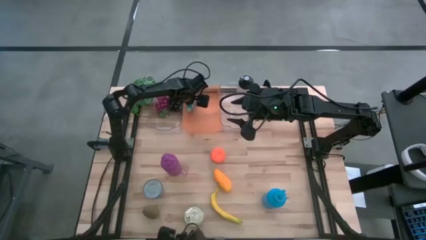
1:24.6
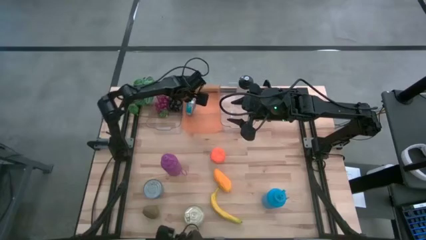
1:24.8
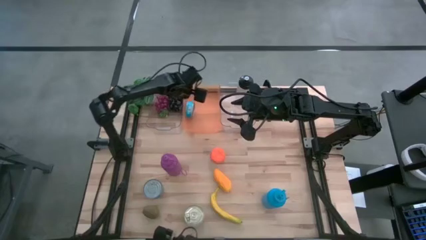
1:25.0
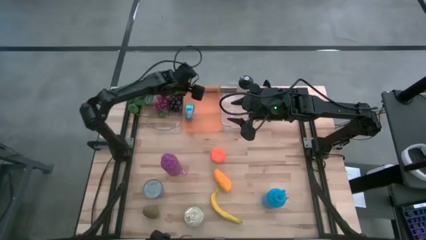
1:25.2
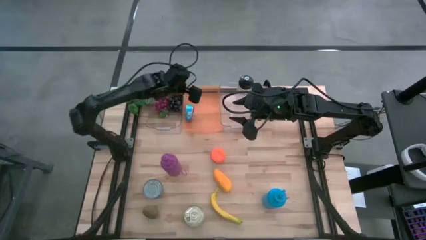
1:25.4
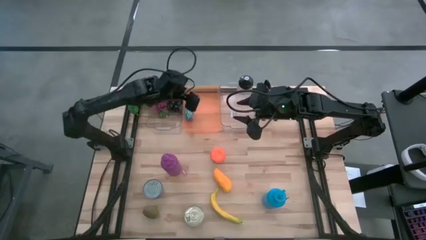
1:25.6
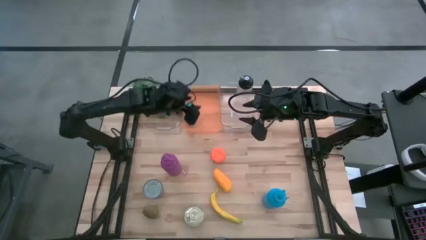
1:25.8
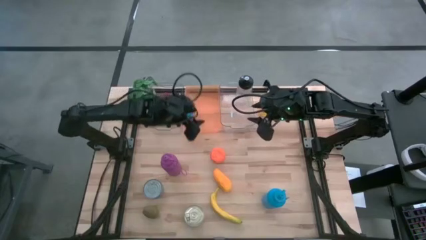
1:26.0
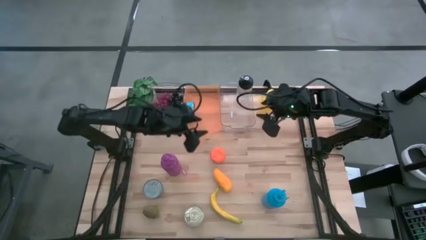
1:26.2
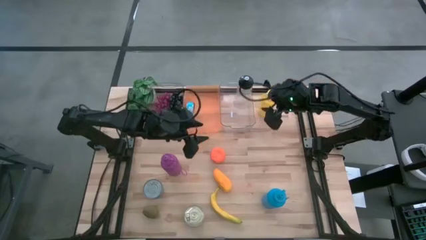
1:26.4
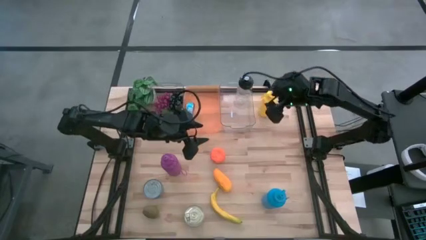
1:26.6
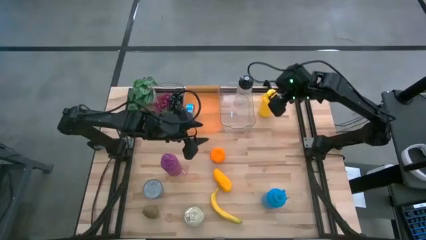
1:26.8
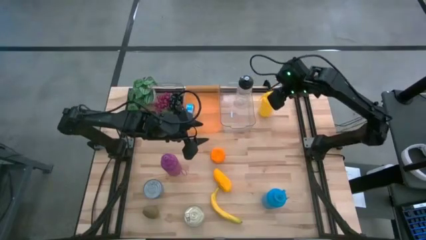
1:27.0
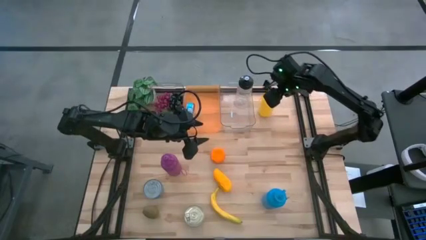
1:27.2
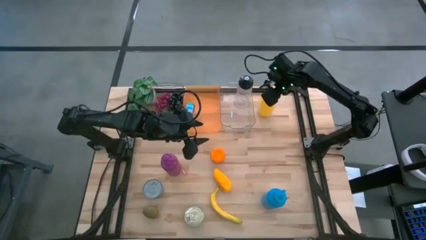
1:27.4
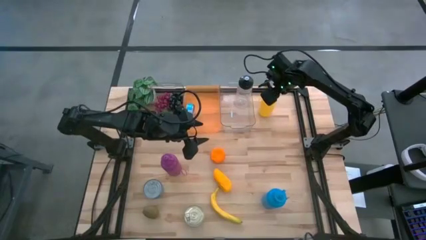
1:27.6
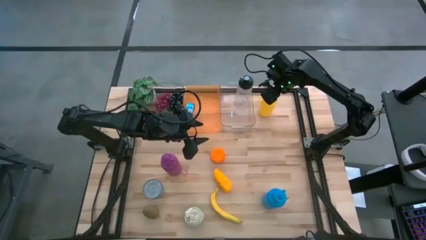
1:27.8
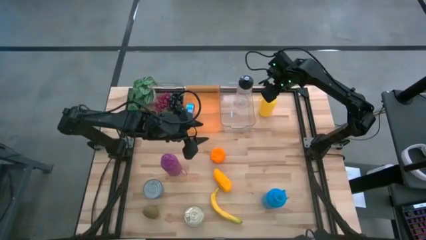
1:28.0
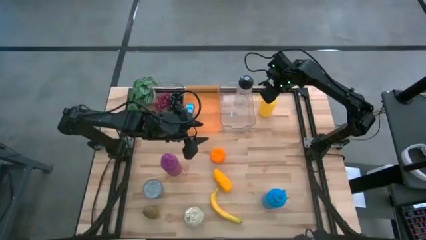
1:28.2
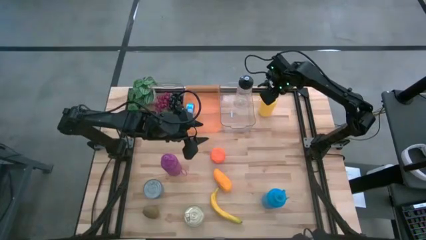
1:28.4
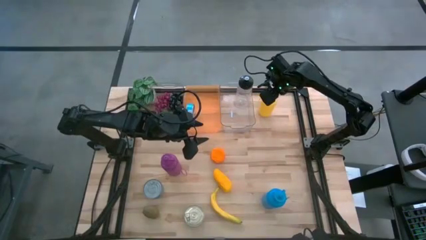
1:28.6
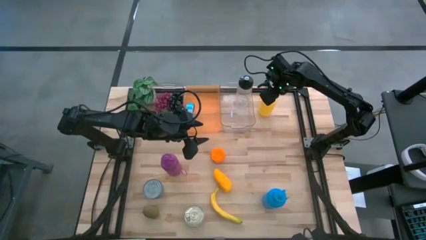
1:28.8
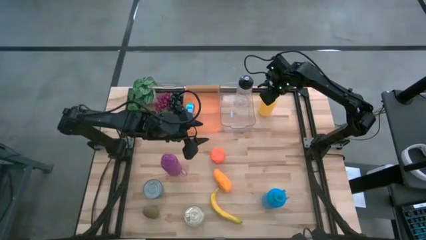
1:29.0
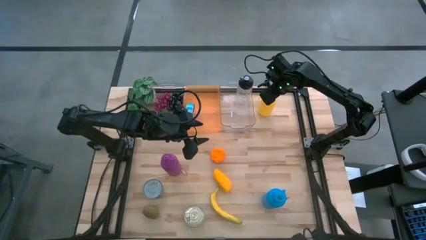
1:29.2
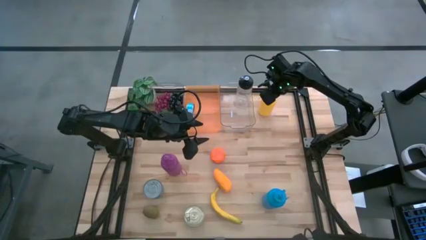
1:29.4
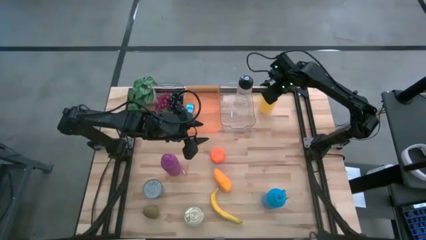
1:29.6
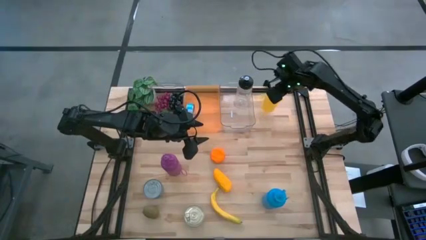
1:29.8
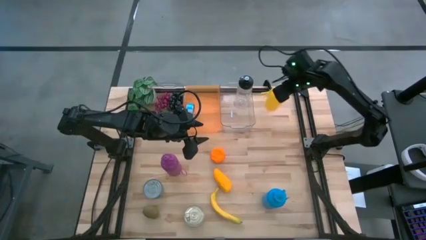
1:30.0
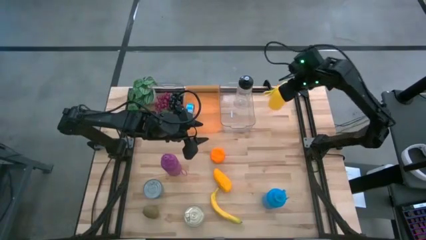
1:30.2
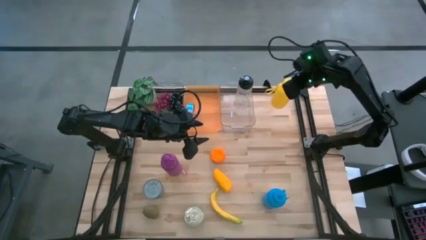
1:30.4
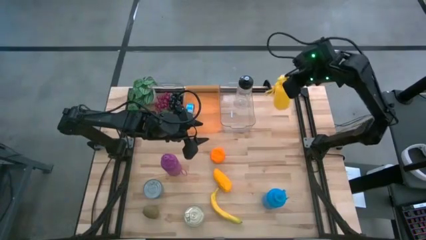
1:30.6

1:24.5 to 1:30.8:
Task: Pick & Place Food Item
Put the yellow water bottle into the right transparent bin

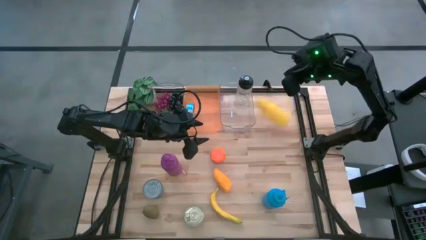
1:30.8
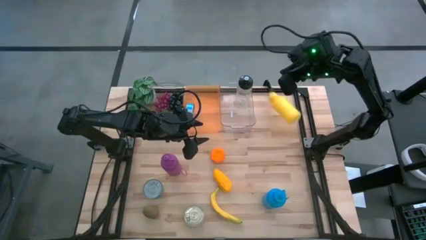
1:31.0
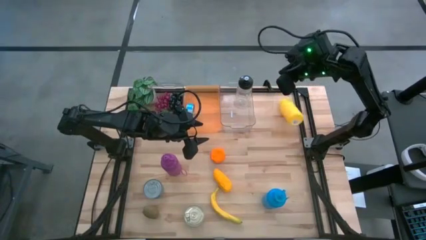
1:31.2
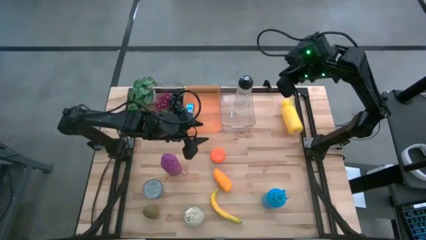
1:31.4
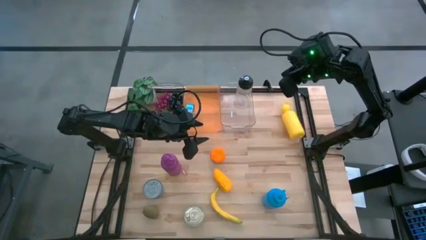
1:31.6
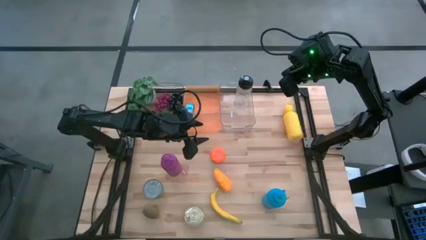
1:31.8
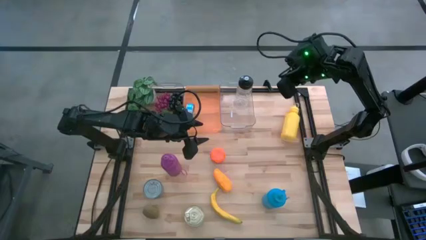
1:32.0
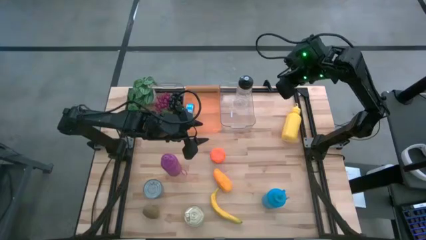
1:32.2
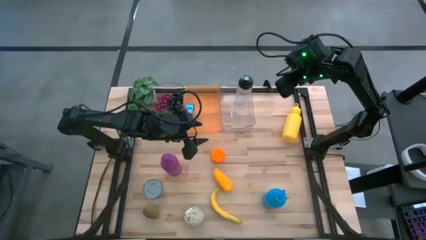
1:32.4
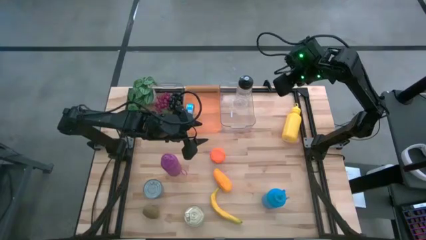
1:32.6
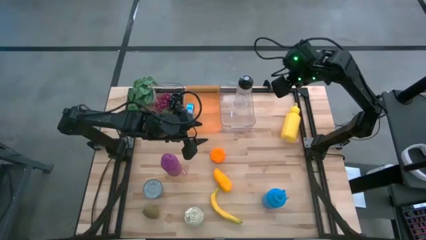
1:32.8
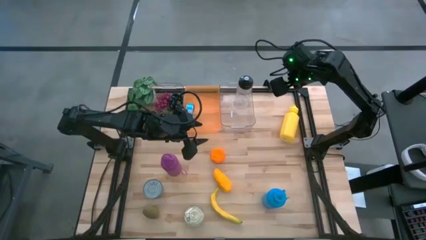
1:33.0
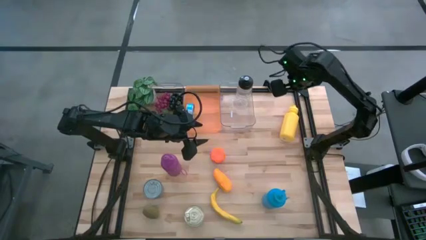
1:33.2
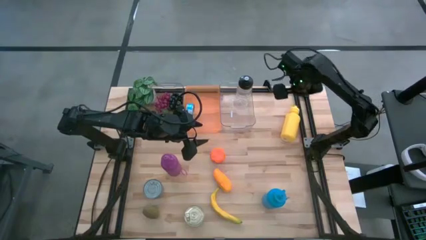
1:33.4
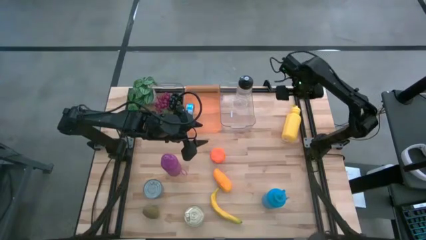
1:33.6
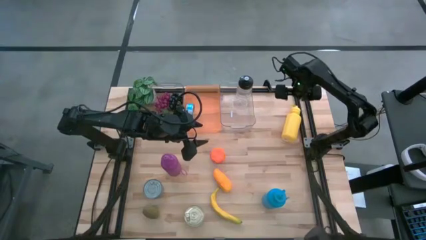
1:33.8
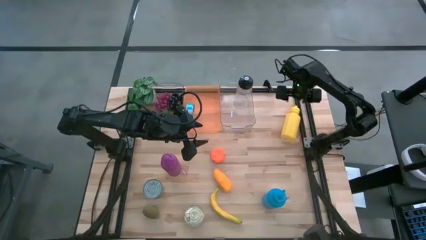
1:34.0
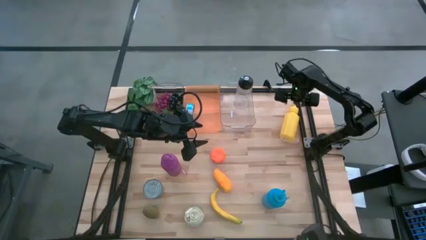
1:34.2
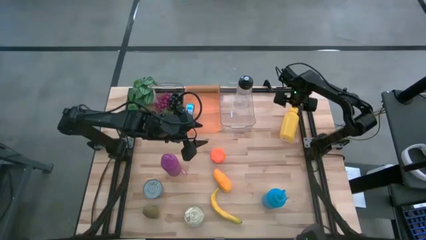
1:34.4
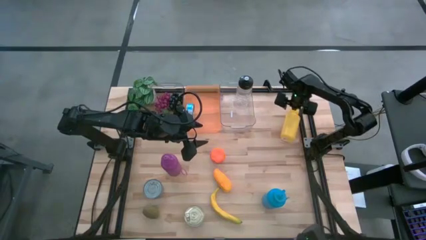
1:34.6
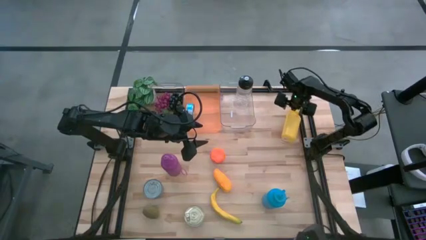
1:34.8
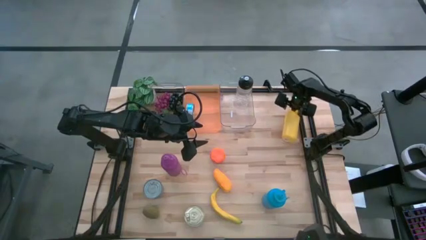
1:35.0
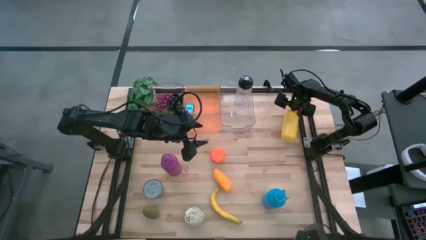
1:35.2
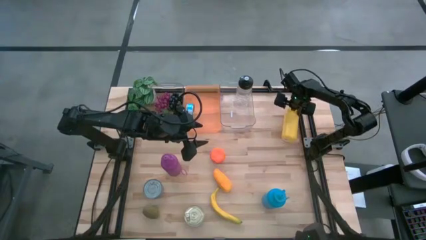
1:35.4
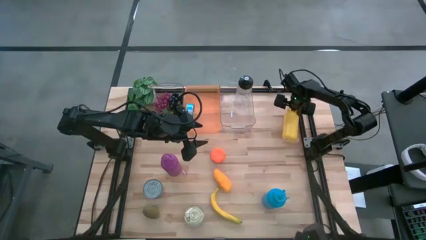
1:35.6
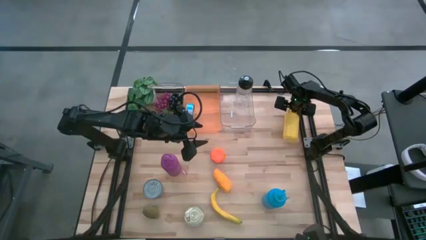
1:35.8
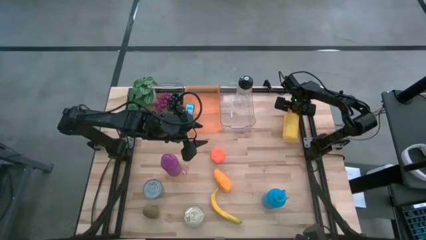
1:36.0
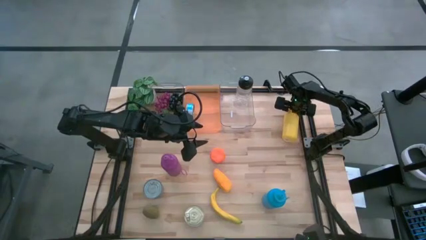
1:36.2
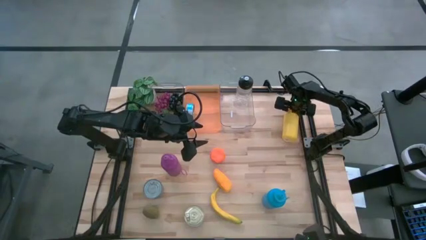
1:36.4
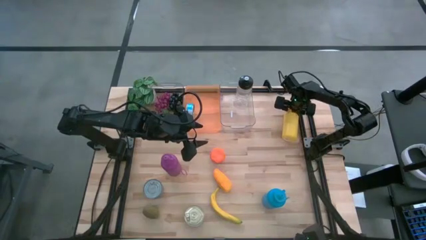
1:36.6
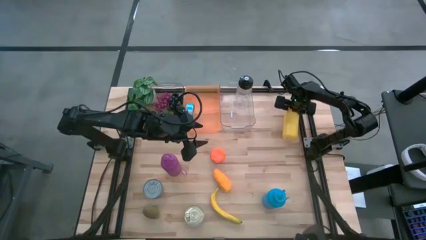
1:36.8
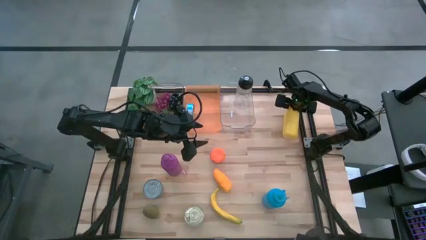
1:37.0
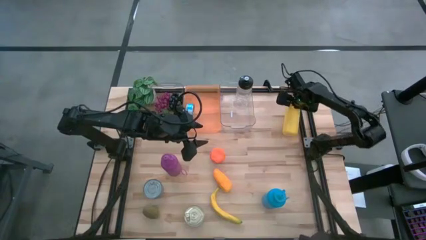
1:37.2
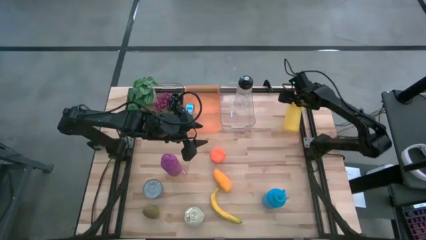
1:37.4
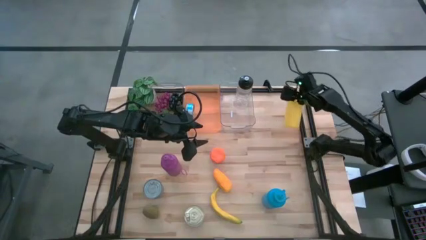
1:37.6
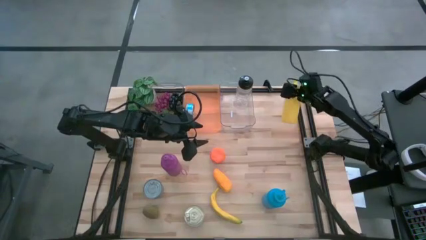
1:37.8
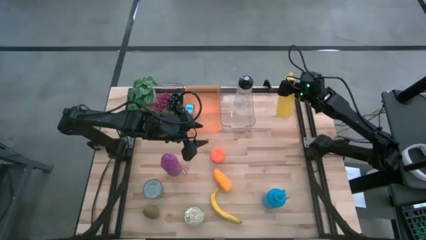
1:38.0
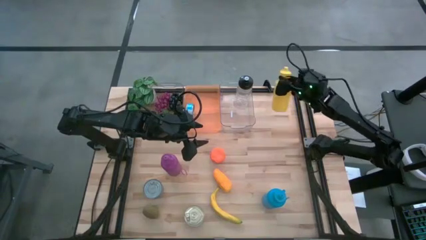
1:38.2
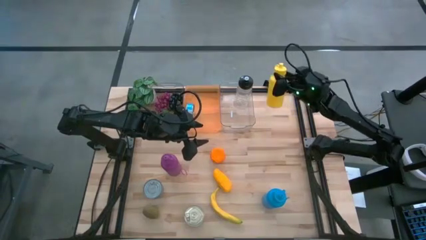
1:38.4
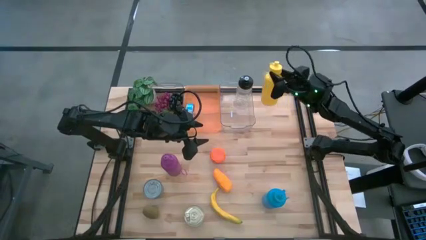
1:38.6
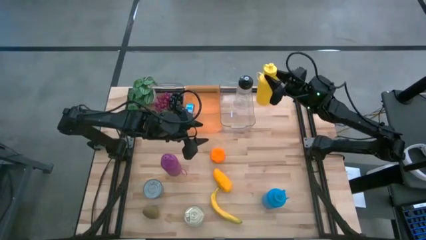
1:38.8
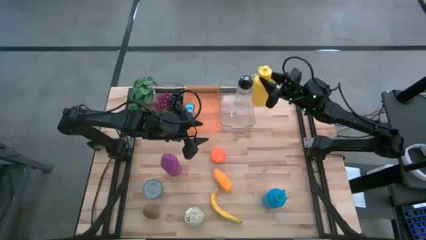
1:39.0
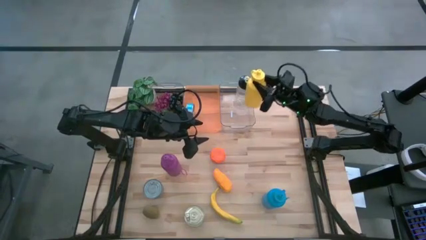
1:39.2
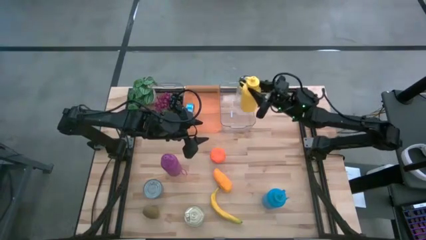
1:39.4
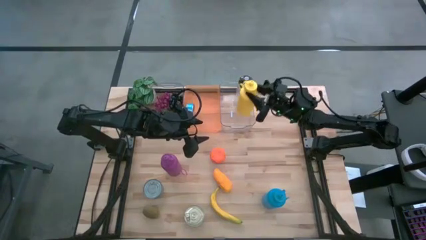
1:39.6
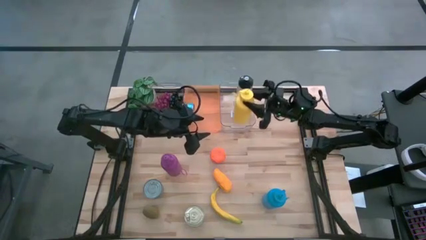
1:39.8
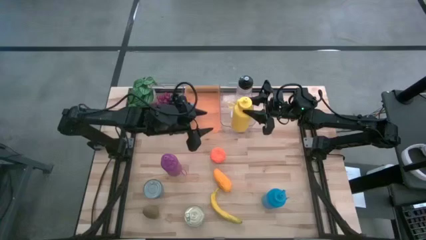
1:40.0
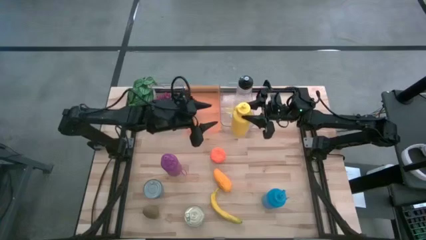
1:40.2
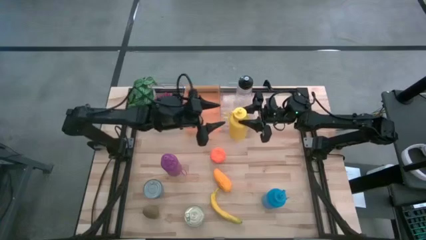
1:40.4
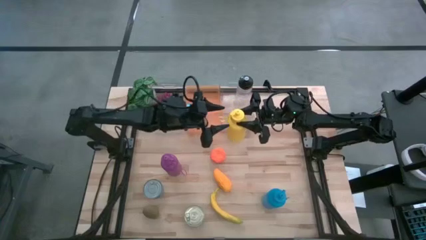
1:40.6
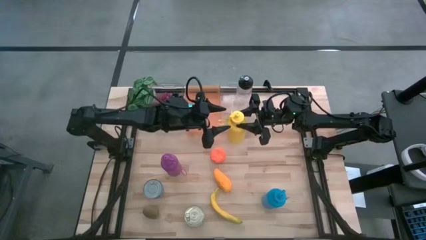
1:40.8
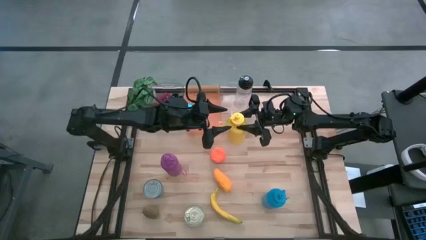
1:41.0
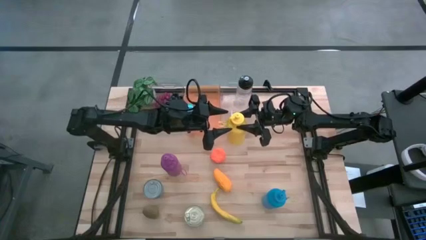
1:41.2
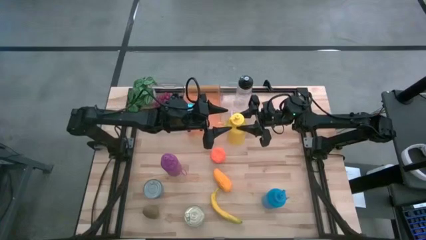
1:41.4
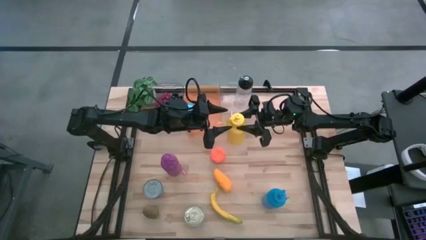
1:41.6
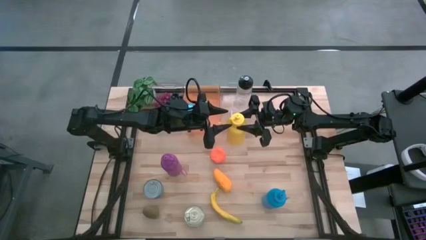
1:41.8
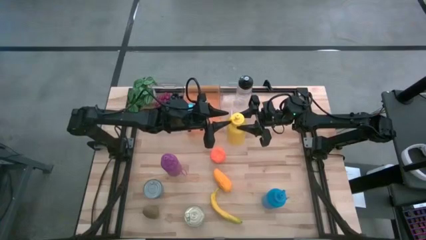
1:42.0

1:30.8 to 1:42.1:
Put the yellow water bottle into the right transparent bin
